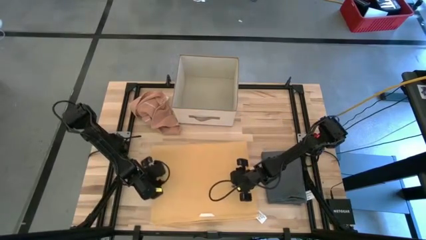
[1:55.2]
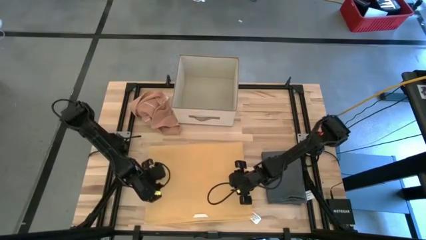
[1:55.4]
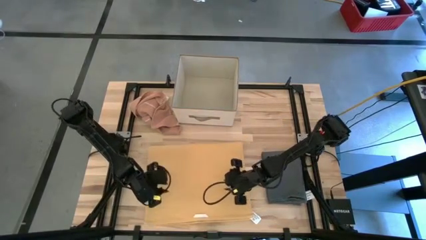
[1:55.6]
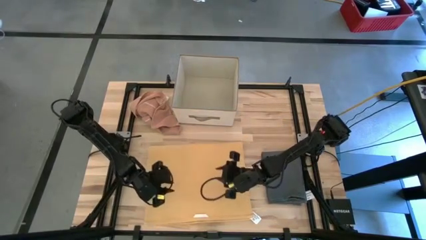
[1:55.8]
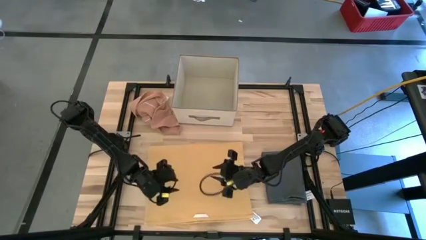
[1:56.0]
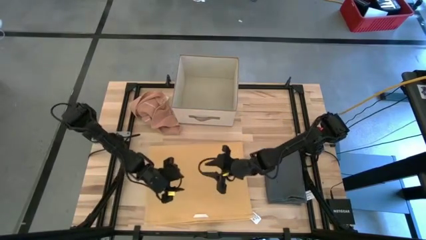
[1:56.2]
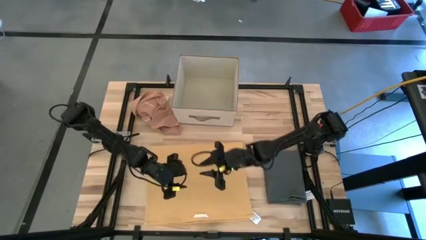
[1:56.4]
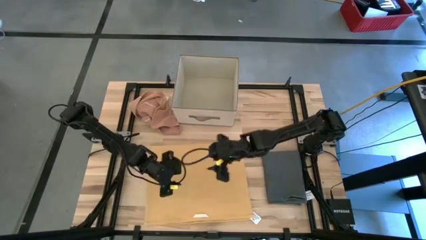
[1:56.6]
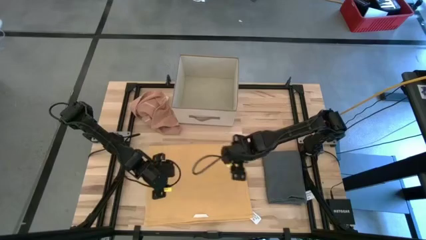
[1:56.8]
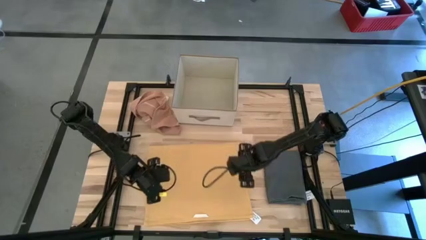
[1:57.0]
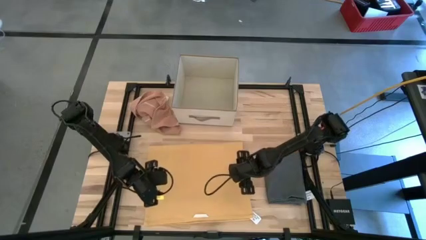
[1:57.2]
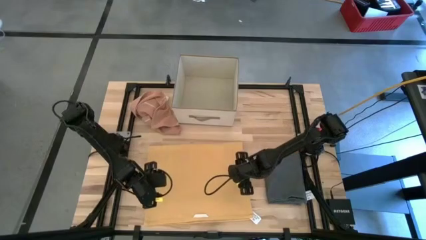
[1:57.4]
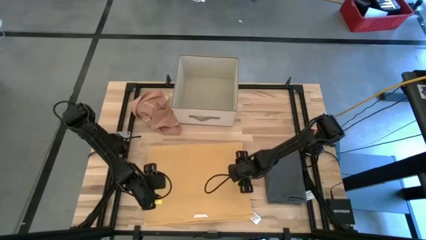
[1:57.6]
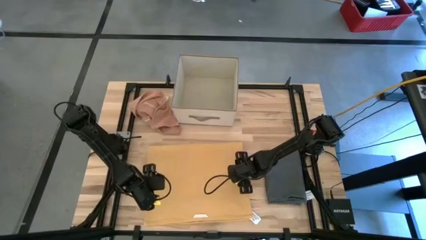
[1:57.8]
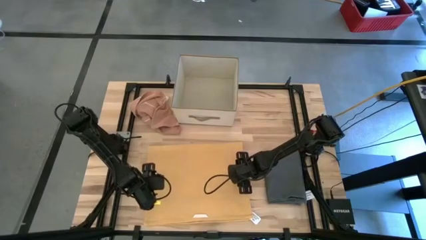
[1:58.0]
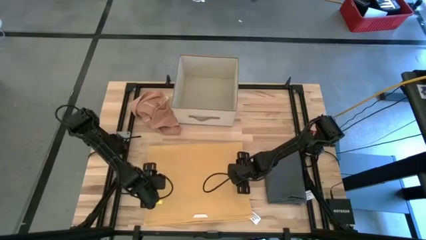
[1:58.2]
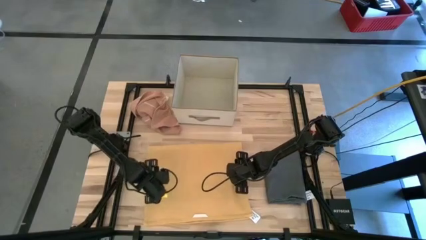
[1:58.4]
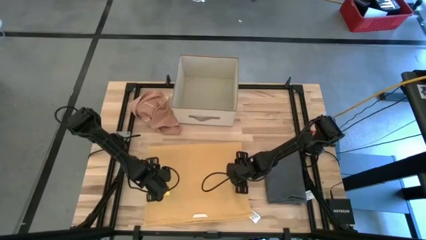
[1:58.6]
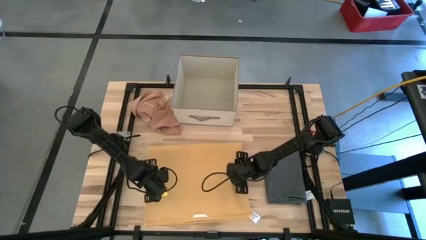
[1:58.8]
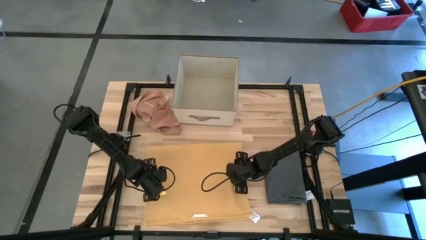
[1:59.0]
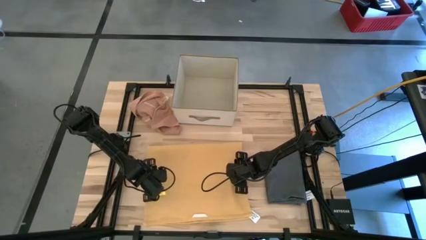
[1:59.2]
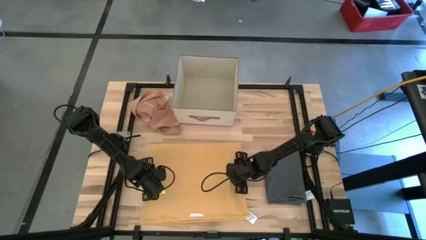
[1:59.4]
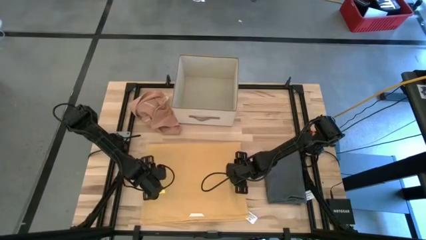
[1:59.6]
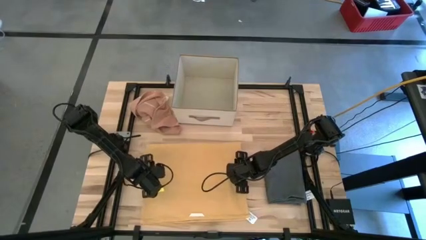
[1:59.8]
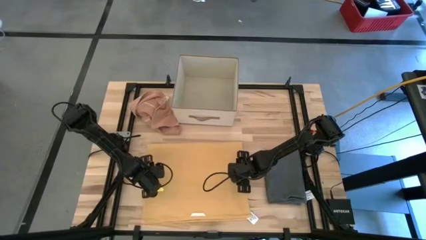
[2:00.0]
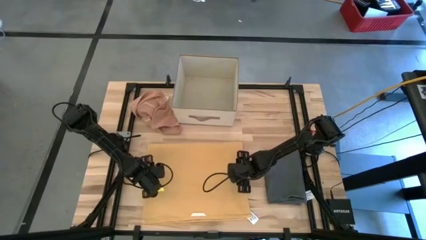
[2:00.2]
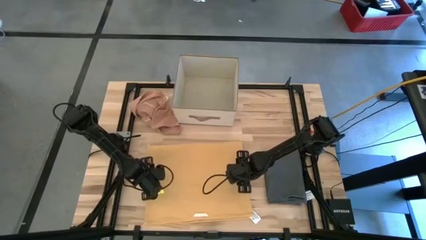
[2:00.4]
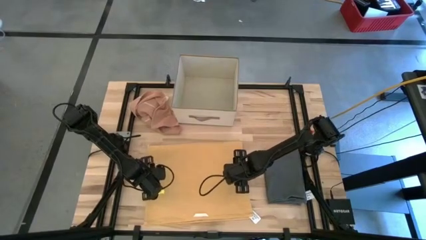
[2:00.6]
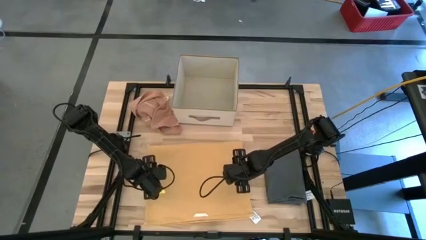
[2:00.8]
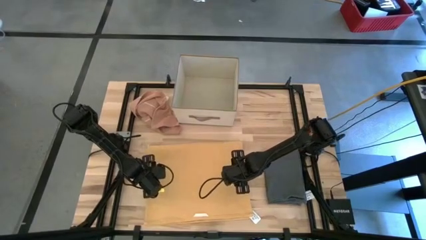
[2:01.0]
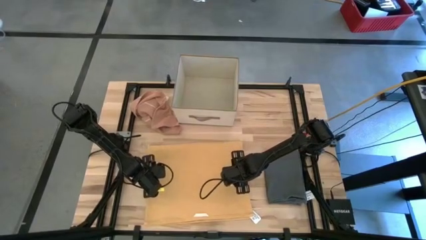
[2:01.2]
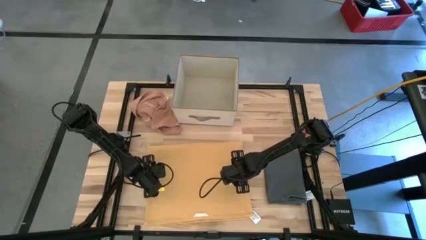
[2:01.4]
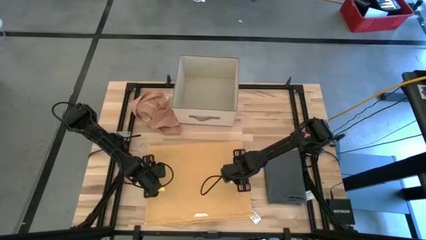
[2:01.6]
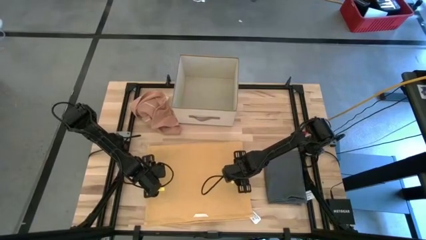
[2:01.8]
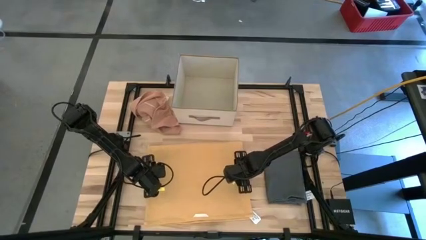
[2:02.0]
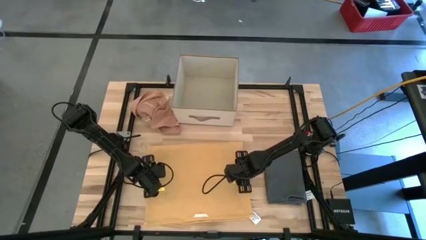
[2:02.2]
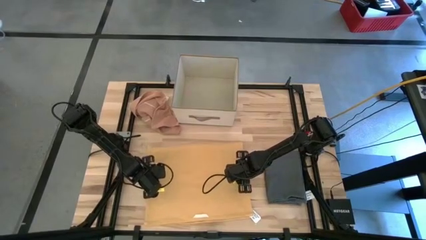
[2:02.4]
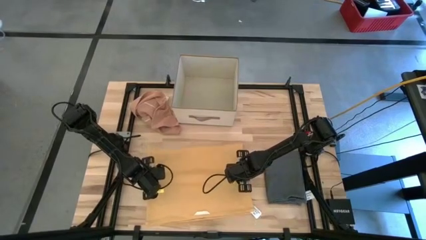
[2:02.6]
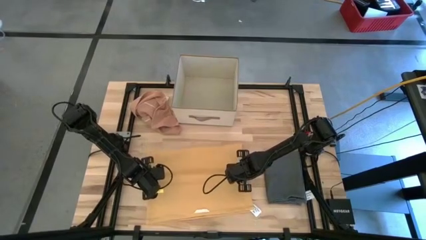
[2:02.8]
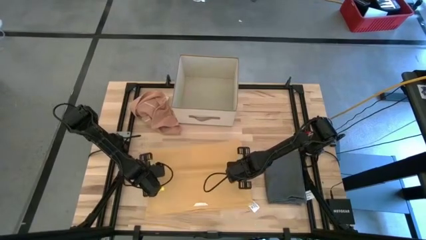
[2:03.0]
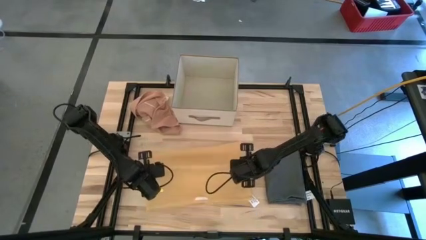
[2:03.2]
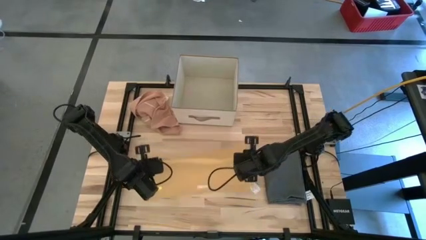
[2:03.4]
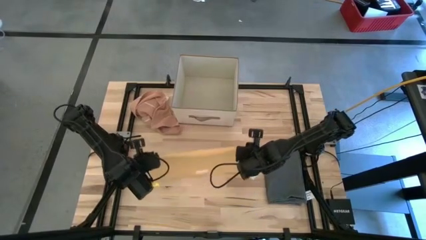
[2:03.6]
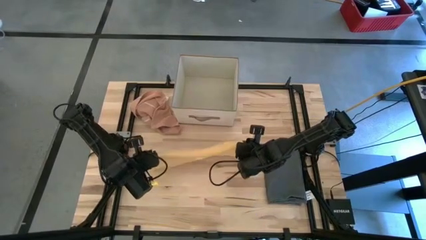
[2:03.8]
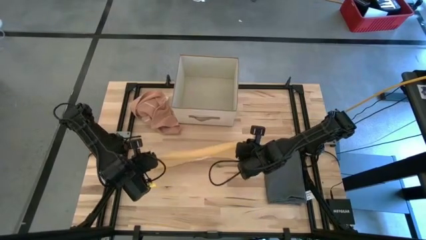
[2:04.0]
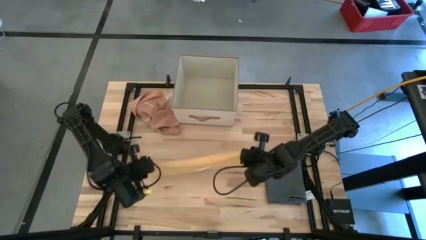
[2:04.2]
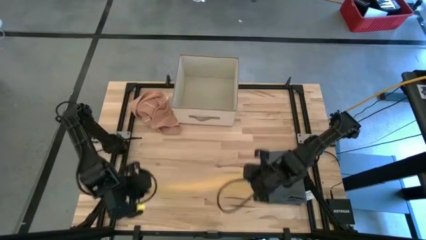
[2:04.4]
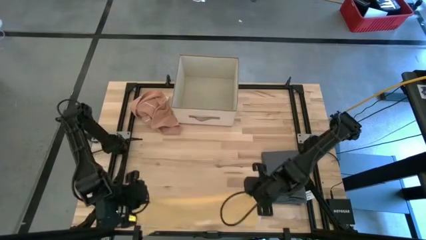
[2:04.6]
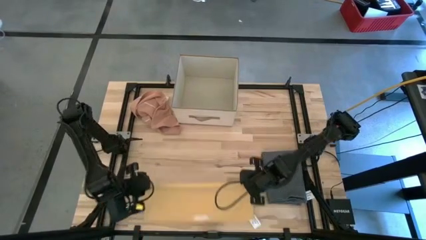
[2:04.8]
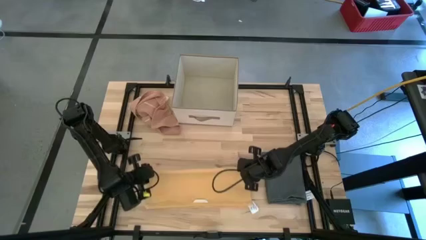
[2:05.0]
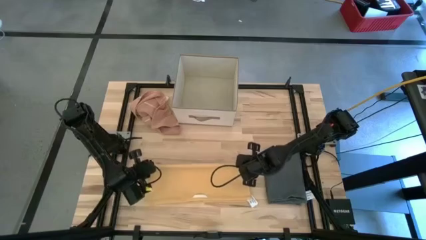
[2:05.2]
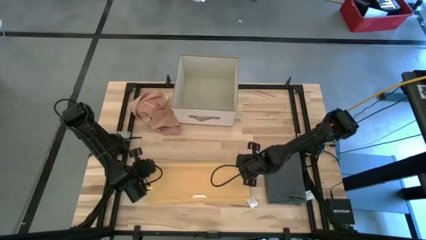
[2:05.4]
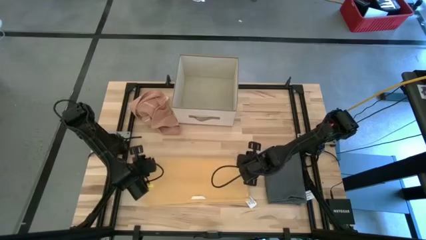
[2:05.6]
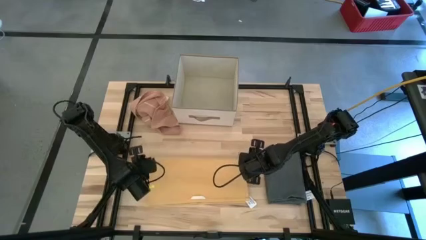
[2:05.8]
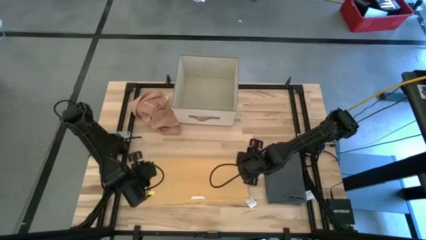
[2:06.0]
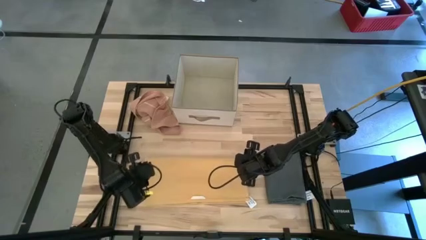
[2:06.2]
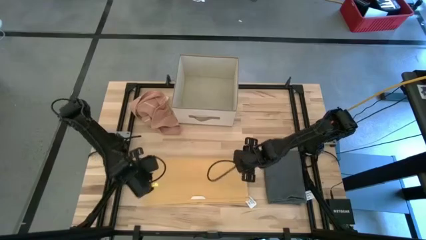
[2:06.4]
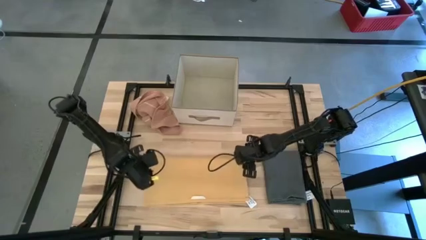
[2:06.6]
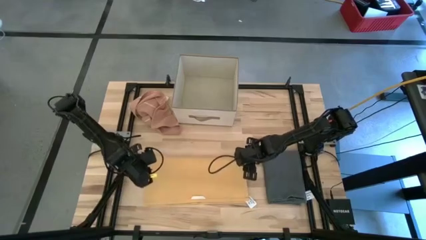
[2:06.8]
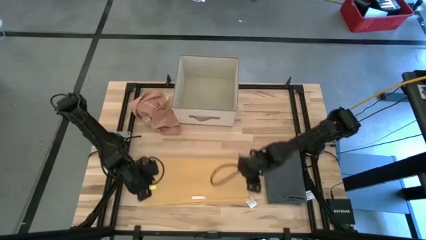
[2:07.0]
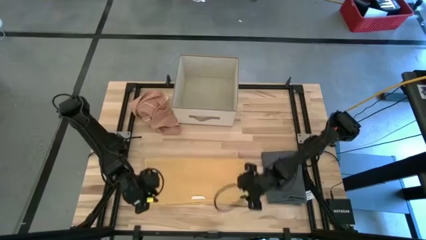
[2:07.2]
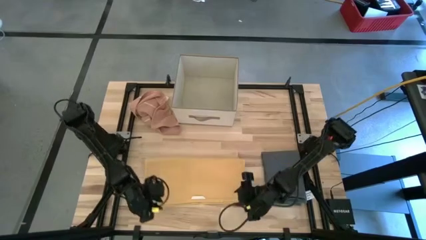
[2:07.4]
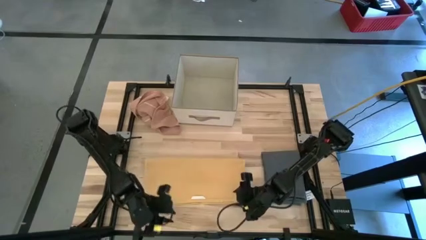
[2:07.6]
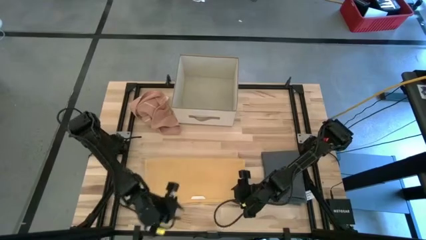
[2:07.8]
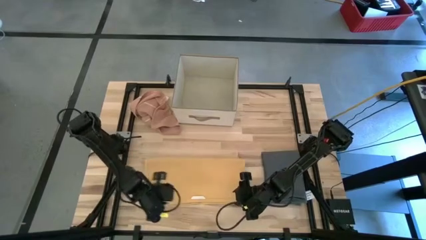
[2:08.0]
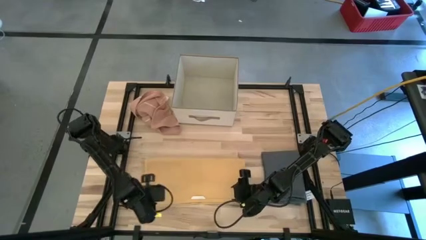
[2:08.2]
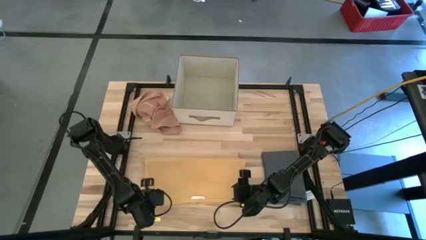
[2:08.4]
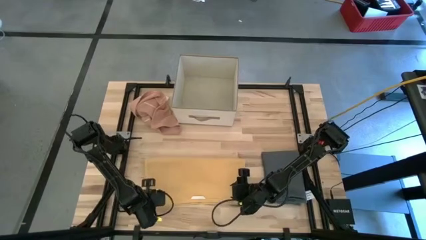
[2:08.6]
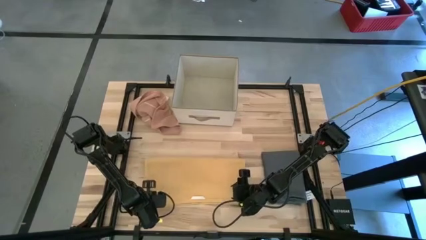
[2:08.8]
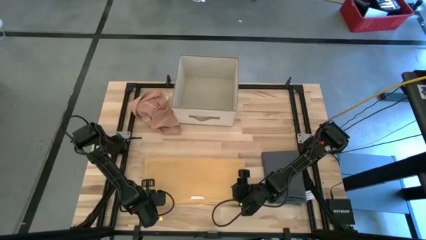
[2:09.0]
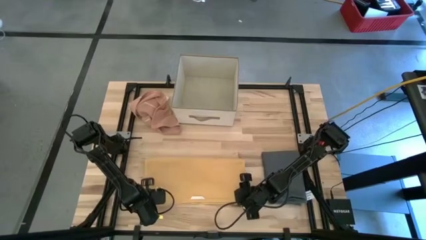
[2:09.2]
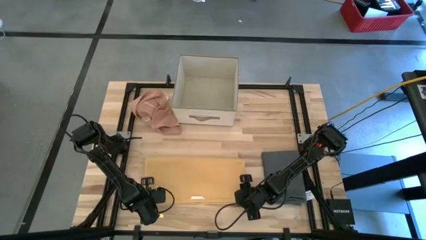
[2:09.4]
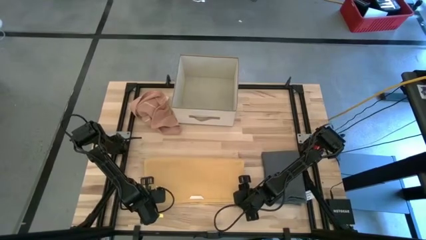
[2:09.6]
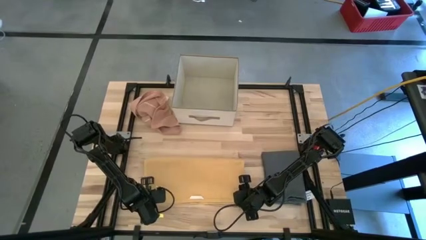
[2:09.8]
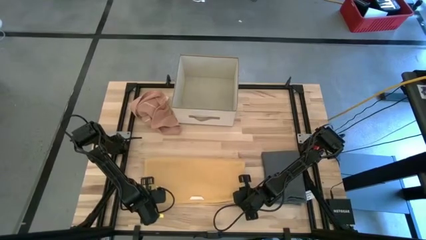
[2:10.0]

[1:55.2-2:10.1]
Task: Fold towel
Fold the yellow towel
